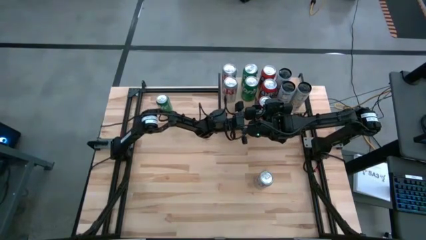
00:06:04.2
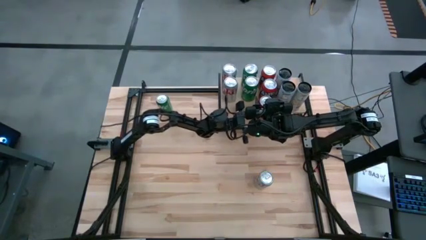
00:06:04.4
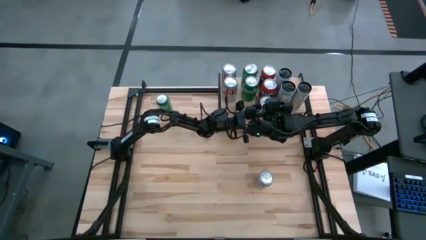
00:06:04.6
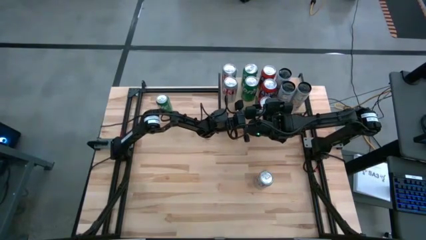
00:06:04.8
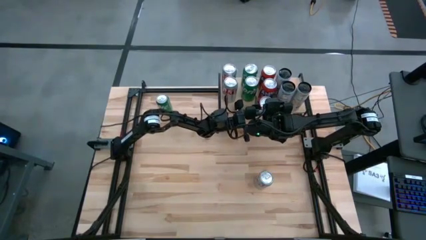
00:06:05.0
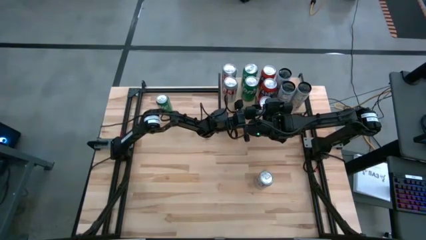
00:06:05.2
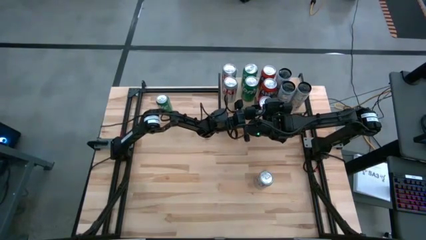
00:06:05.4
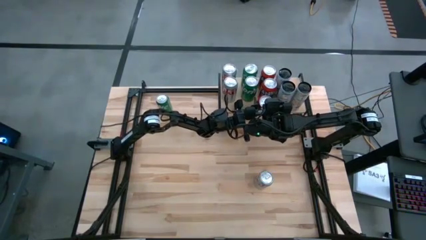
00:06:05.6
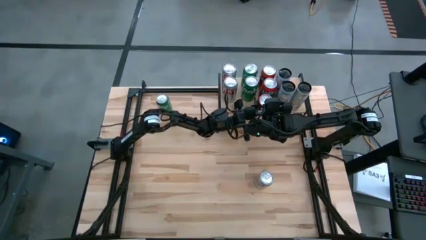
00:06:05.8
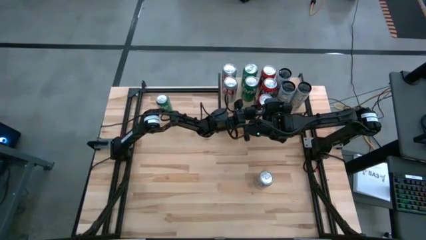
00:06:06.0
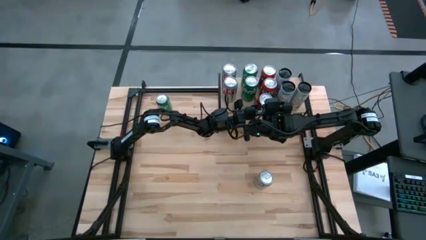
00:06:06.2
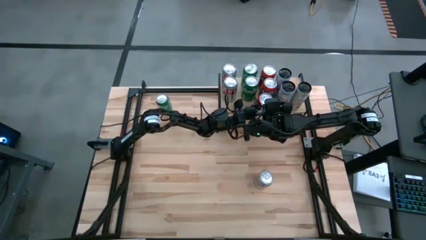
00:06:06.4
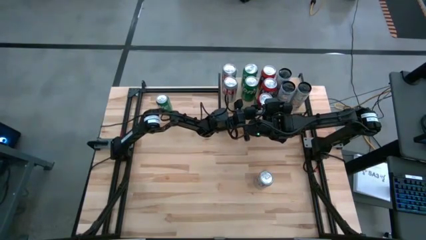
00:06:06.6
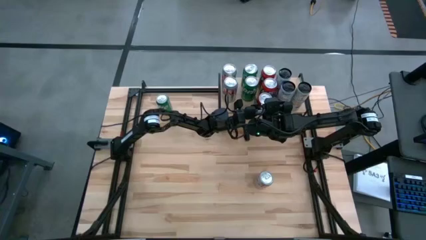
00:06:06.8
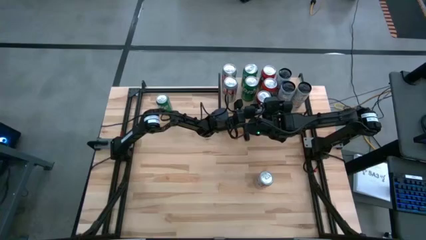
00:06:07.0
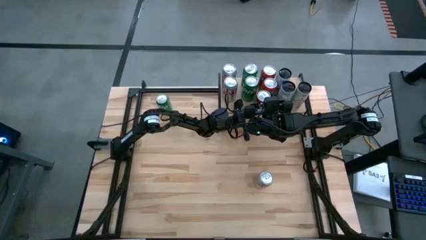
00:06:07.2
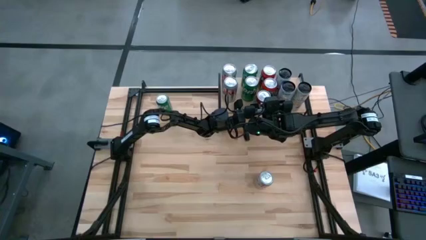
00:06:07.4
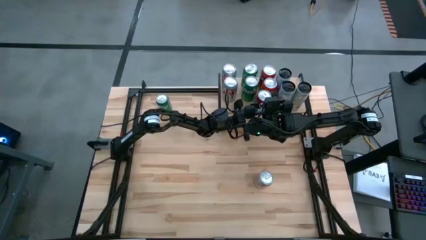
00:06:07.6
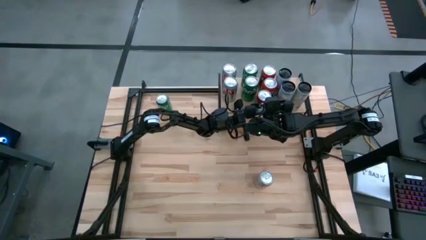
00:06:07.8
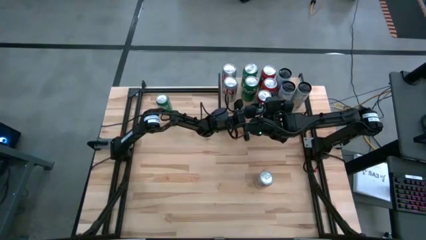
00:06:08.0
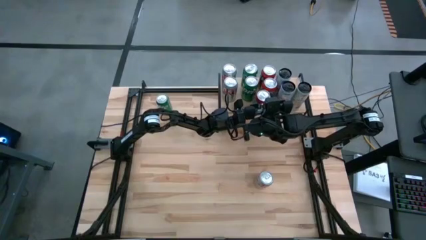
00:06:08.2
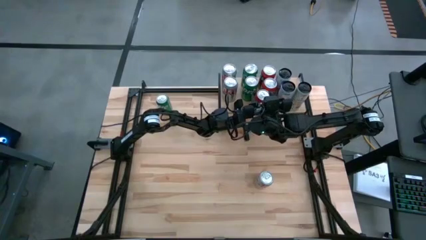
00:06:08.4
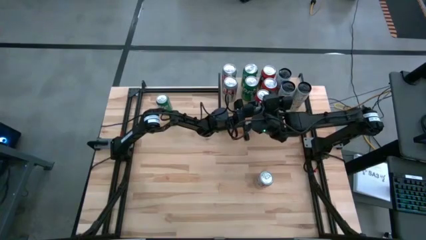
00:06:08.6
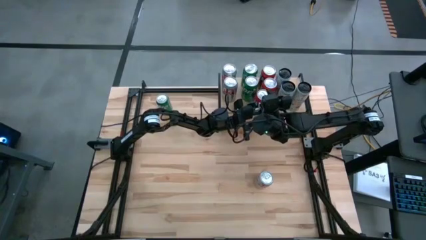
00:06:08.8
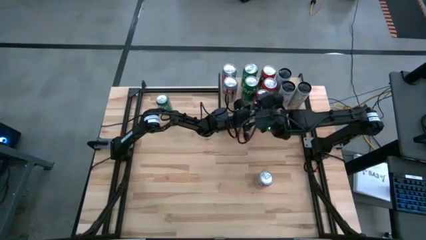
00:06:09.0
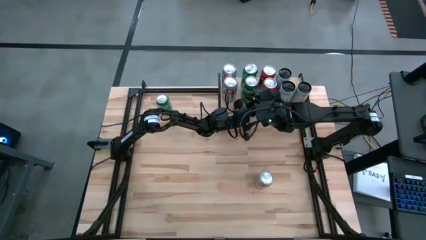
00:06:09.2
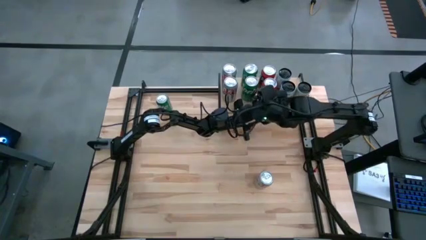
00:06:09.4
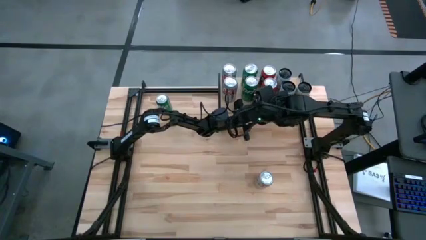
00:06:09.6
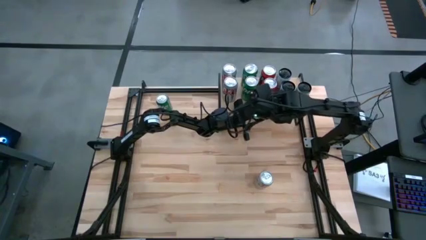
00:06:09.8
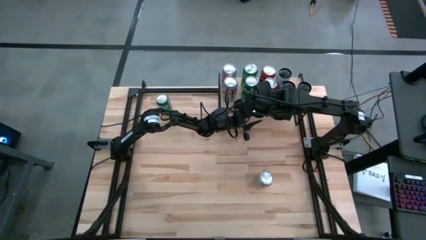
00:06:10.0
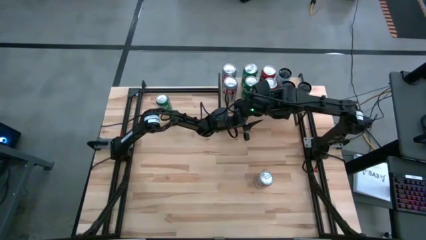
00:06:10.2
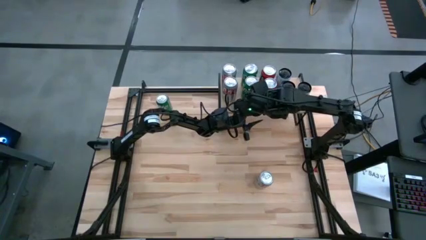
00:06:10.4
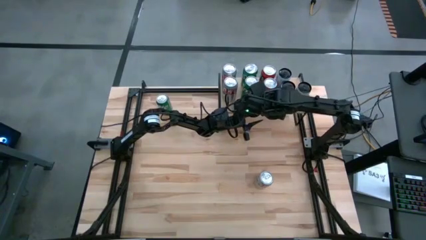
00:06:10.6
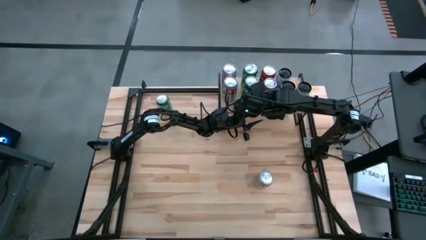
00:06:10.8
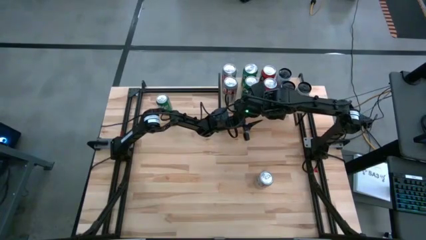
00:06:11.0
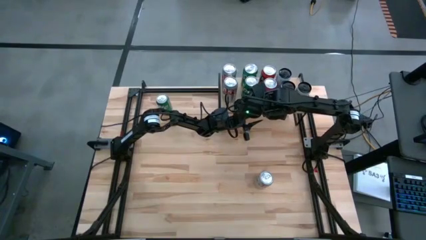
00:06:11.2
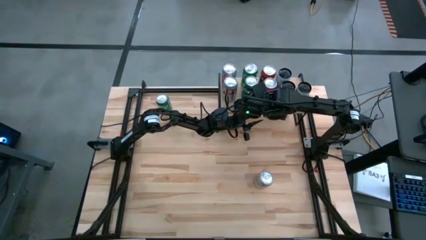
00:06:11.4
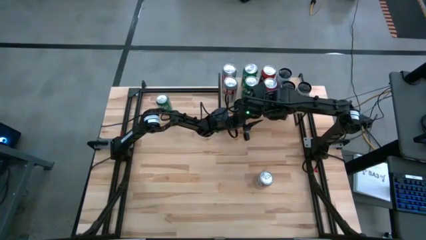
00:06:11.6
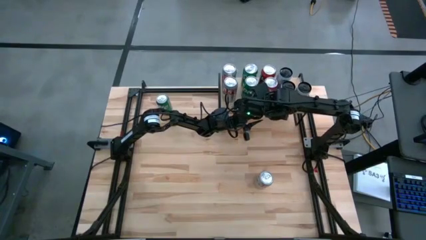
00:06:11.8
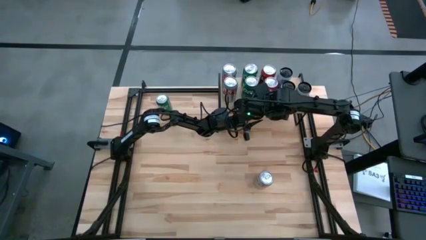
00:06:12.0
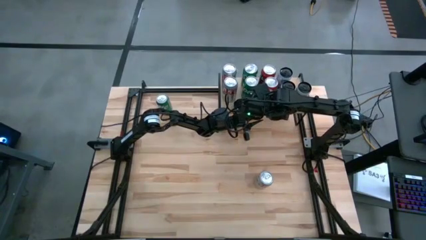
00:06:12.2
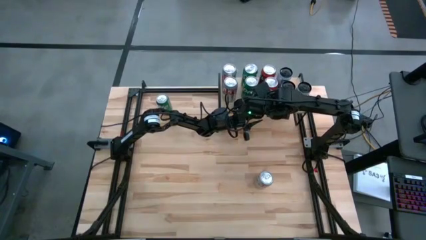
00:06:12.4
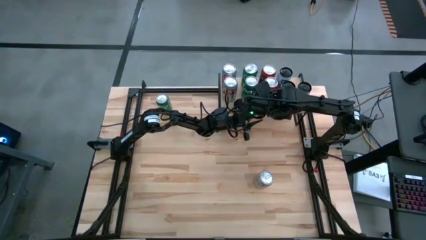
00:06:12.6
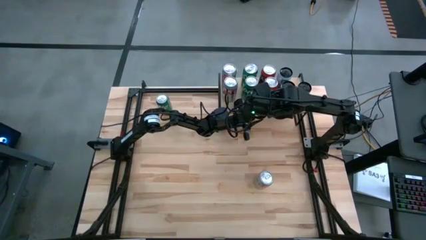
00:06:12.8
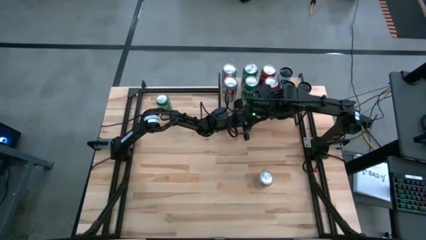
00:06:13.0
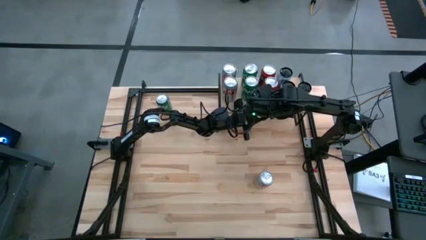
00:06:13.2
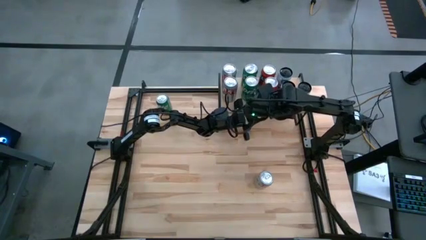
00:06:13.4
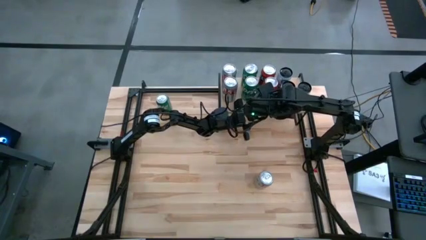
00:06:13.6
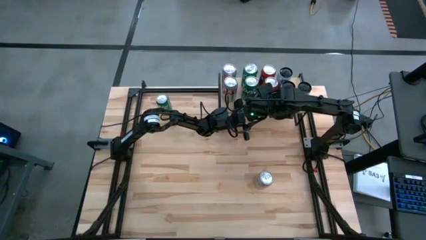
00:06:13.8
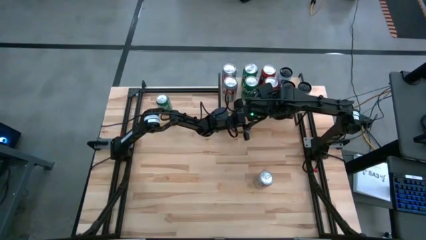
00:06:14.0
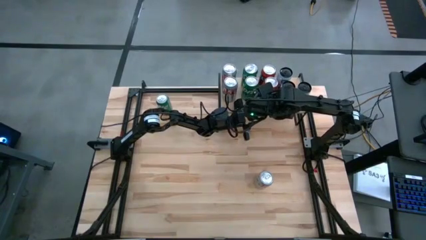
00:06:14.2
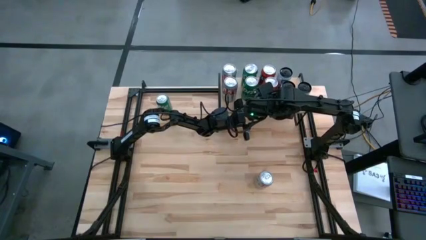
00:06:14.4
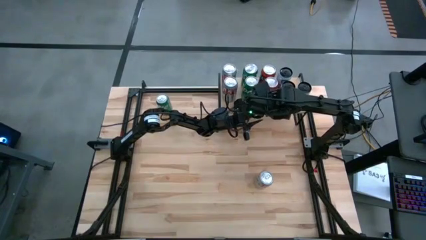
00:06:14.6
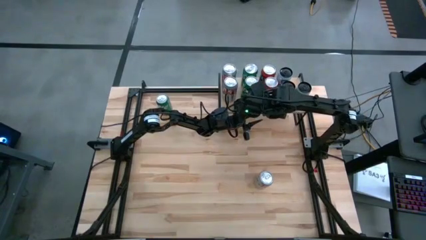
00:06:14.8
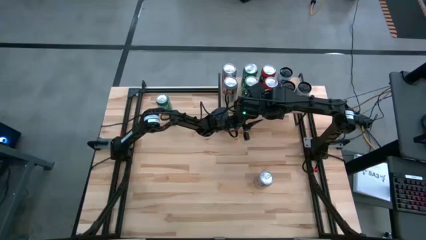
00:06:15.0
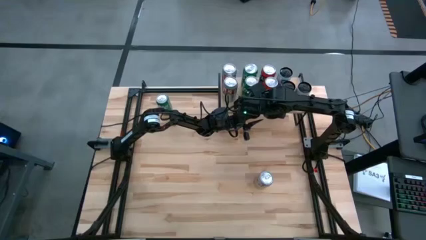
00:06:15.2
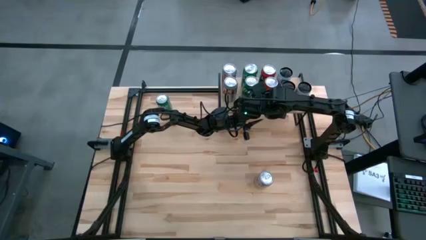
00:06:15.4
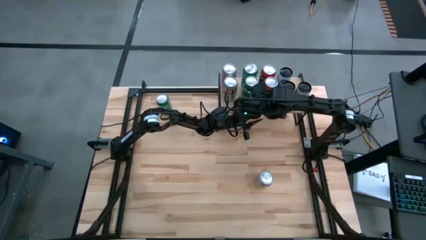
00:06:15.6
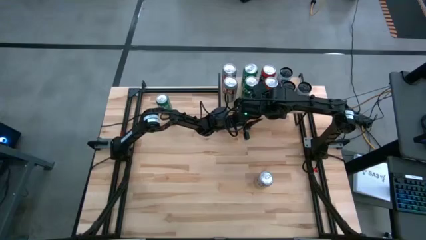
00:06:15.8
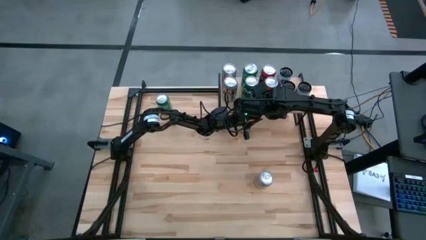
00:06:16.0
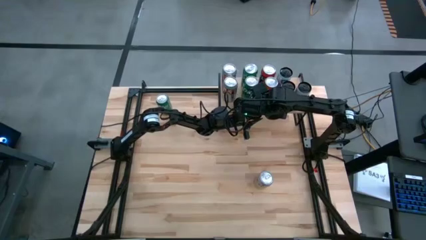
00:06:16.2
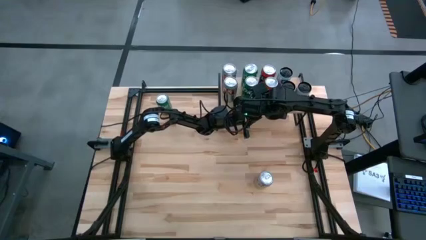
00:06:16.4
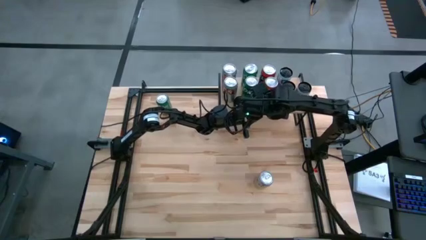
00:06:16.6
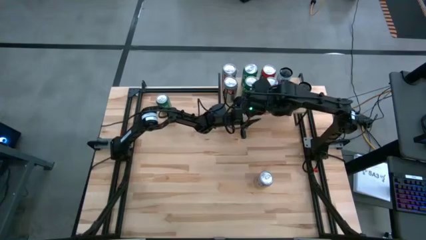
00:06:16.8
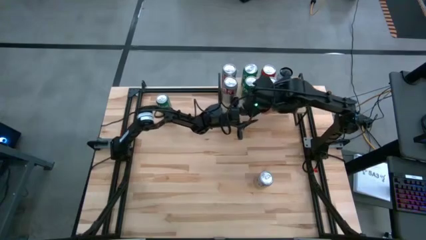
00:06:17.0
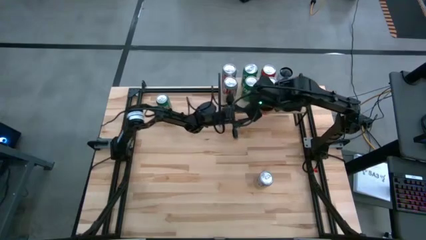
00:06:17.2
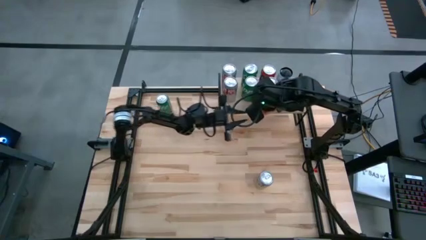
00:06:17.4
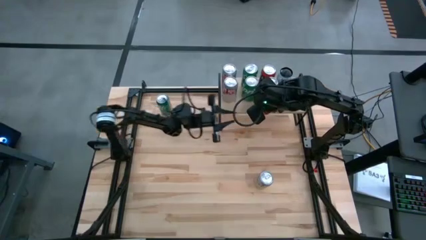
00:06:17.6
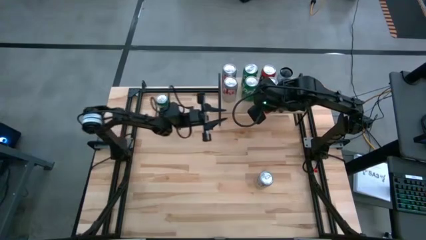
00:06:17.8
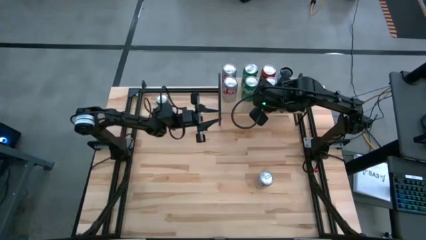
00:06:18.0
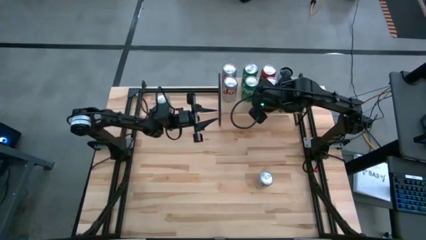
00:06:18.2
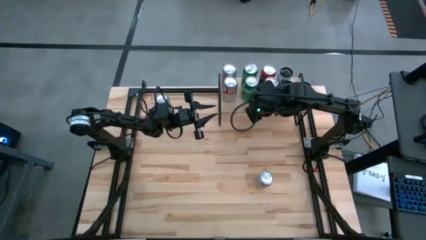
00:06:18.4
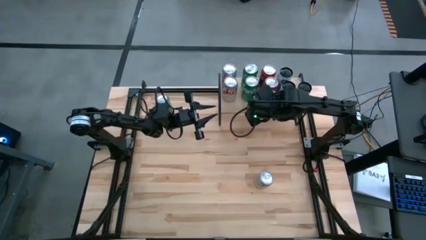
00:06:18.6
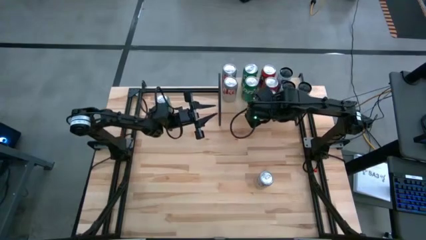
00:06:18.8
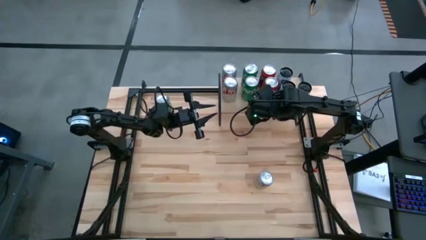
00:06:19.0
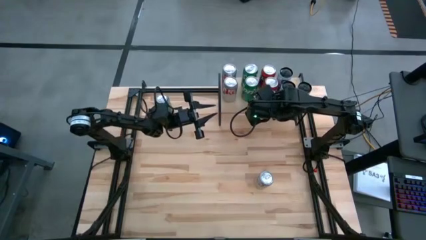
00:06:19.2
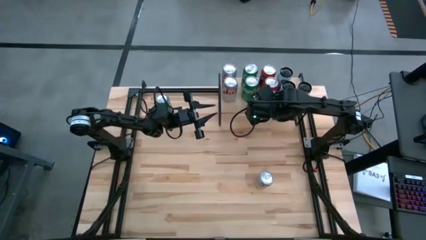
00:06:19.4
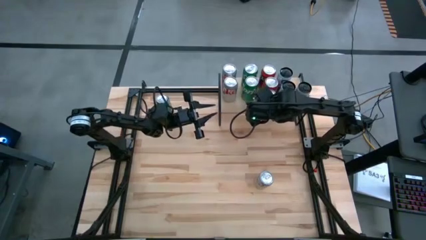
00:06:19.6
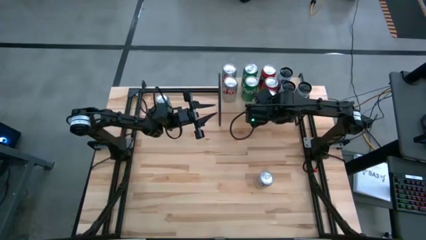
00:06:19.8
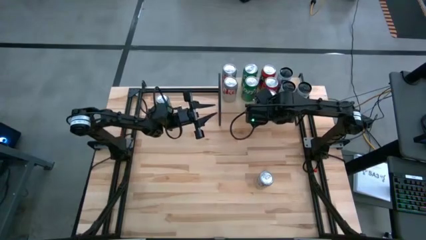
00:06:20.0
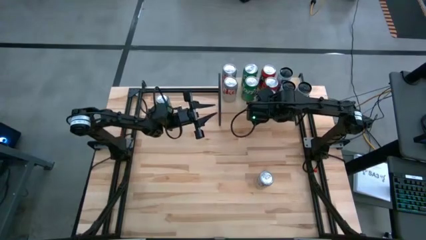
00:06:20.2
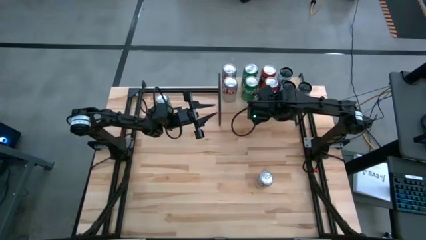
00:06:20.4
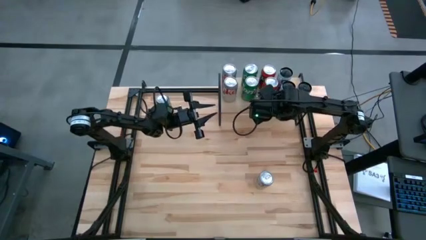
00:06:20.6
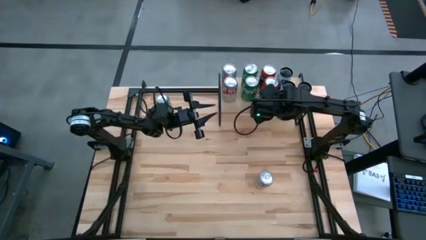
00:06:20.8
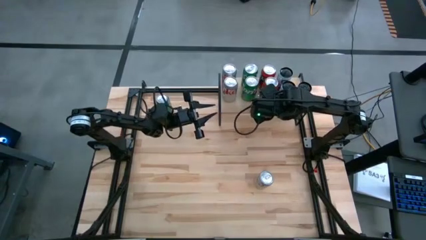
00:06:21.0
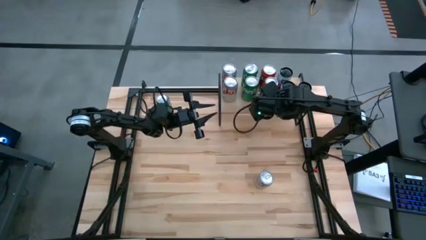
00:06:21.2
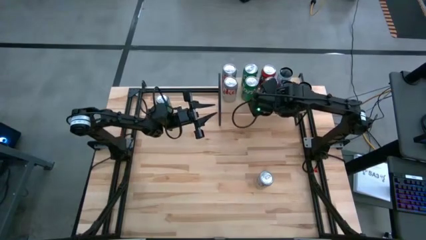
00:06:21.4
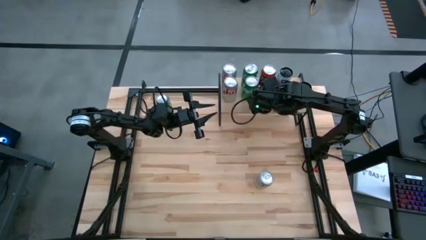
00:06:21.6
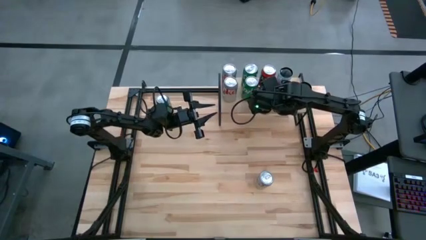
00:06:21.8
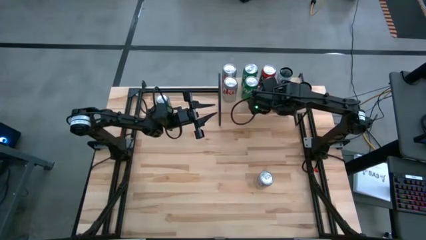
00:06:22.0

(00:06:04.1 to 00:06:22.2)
Task: Place canned beverage on shelf
Put the orange soda can on the shelf aligned in front of the other orange soda can
